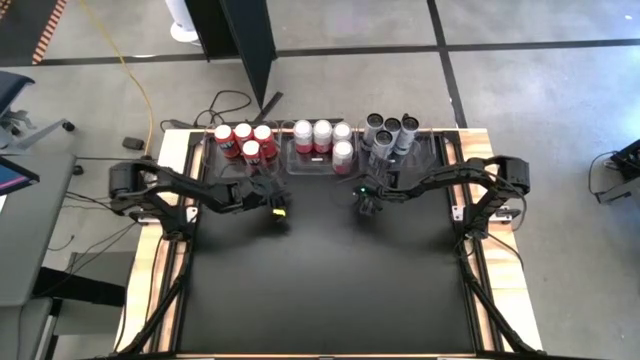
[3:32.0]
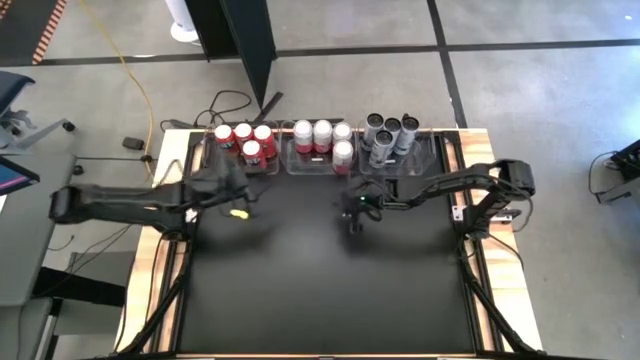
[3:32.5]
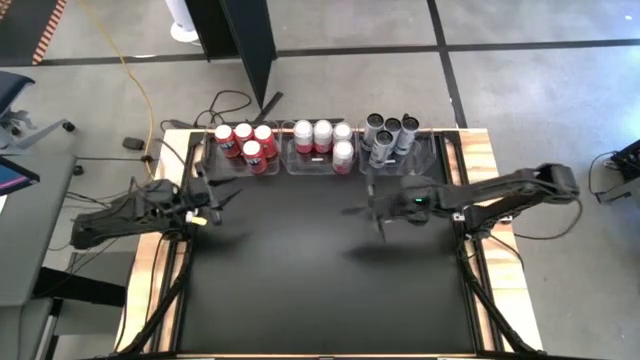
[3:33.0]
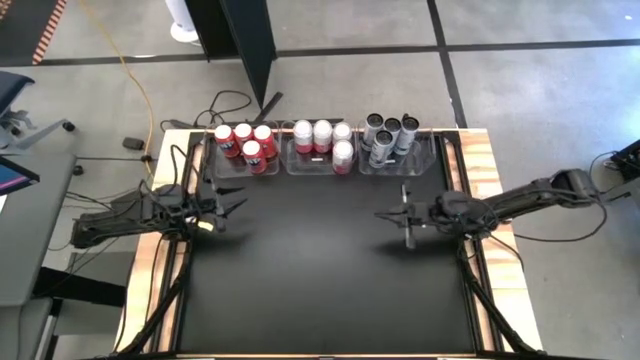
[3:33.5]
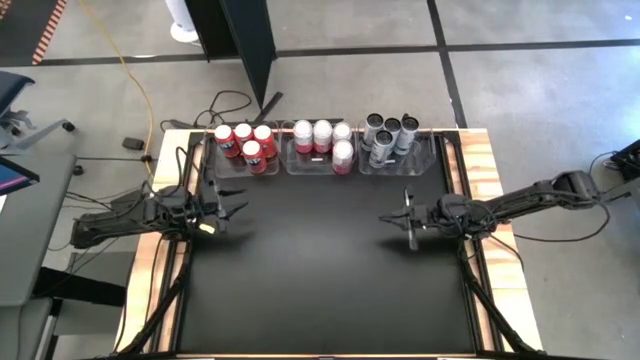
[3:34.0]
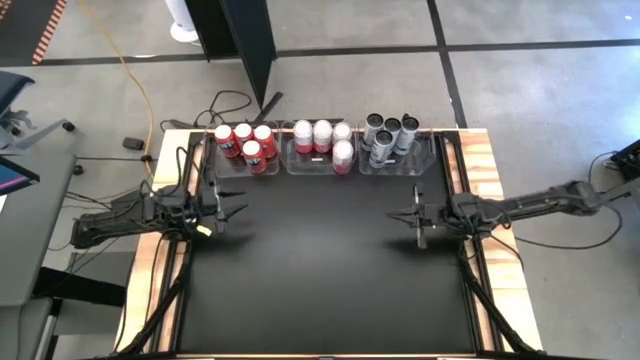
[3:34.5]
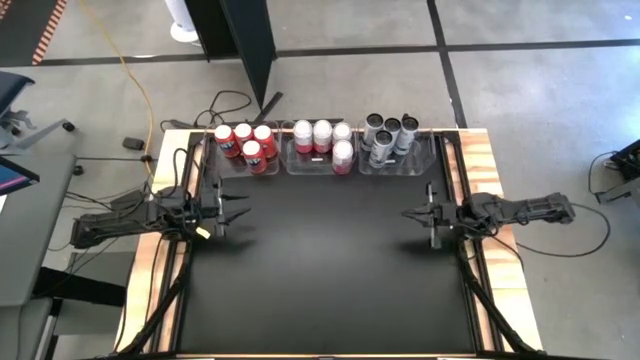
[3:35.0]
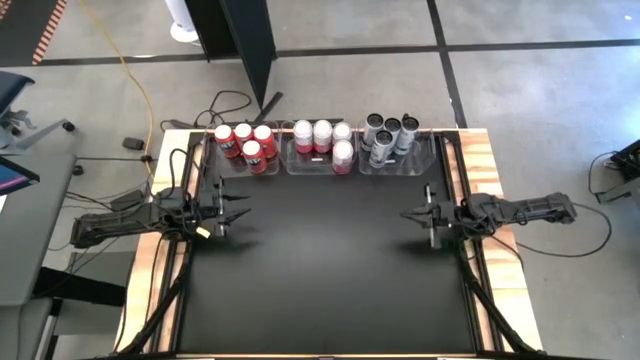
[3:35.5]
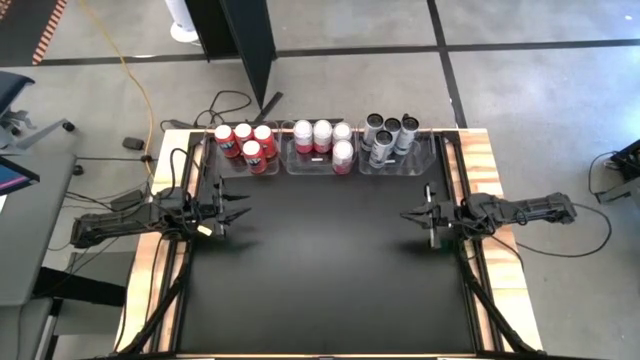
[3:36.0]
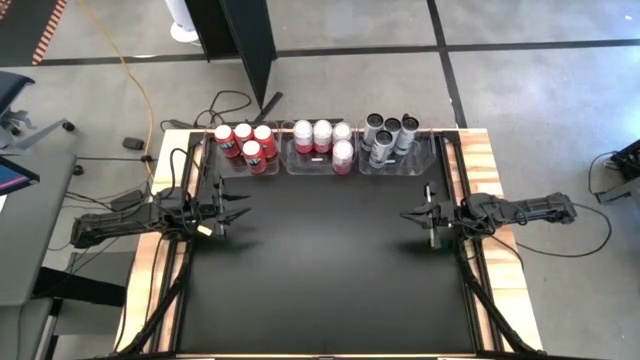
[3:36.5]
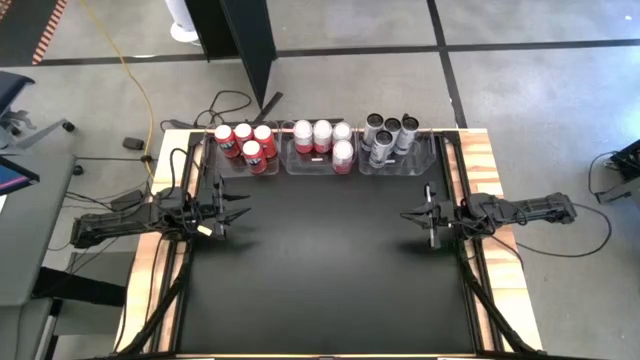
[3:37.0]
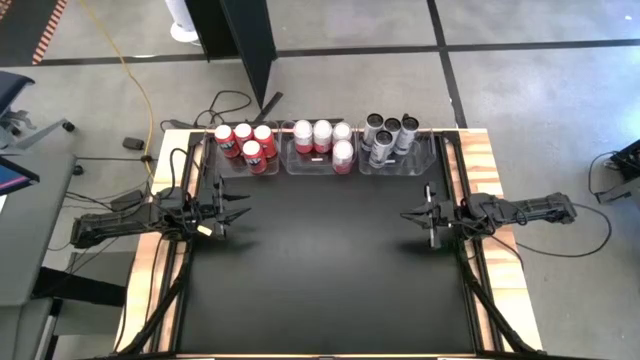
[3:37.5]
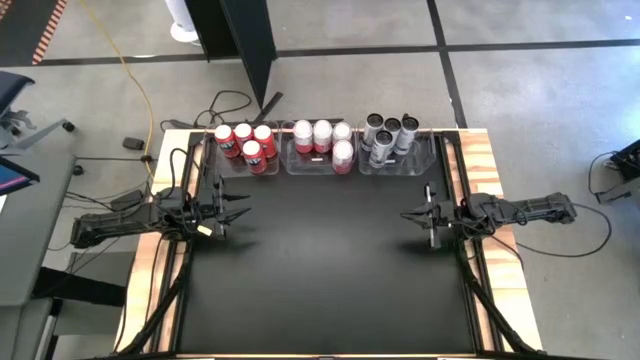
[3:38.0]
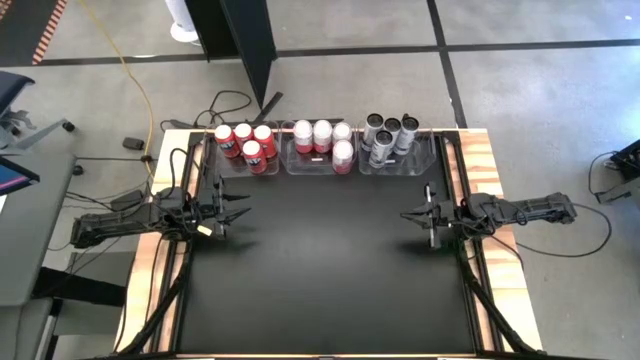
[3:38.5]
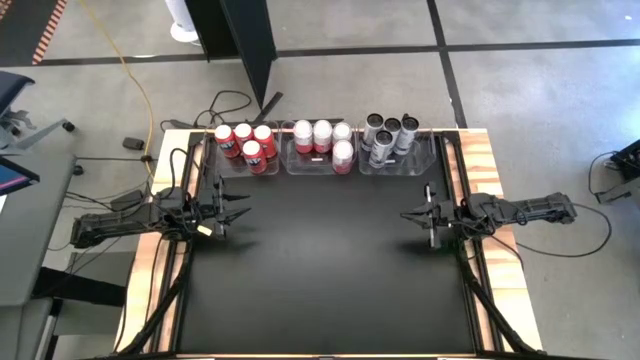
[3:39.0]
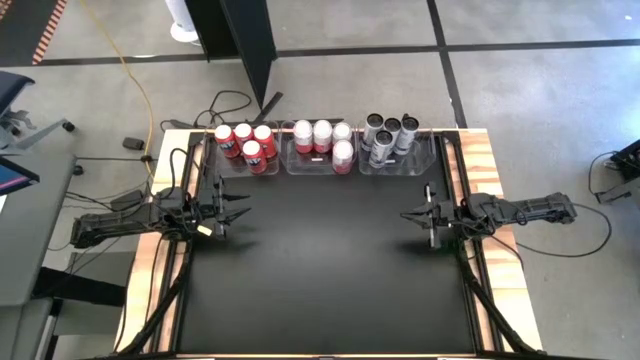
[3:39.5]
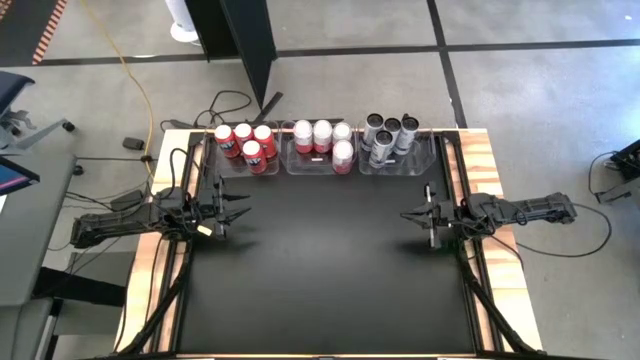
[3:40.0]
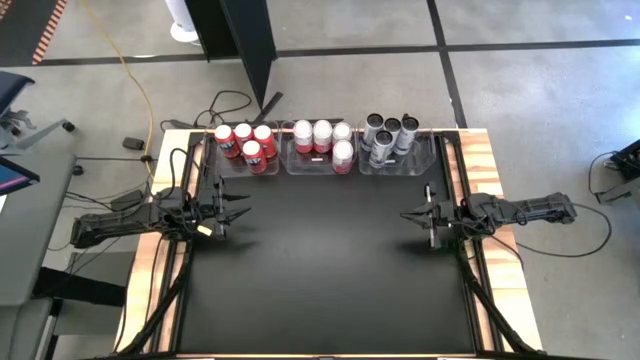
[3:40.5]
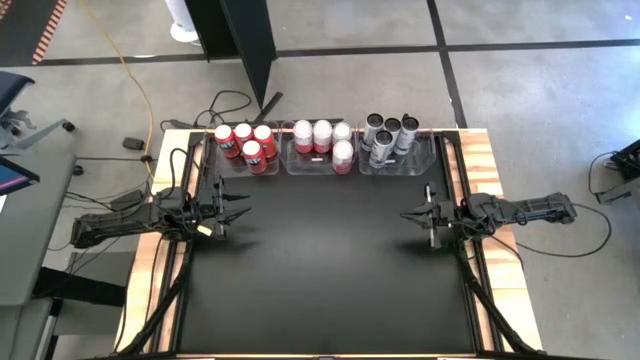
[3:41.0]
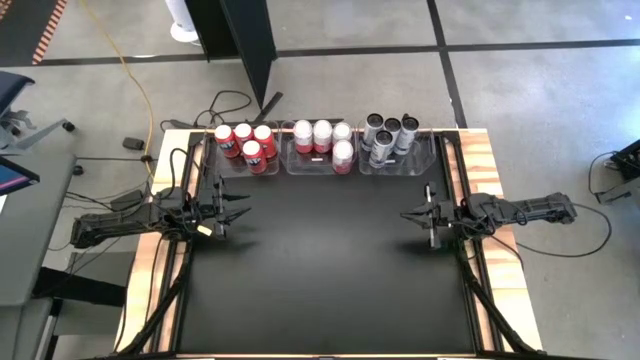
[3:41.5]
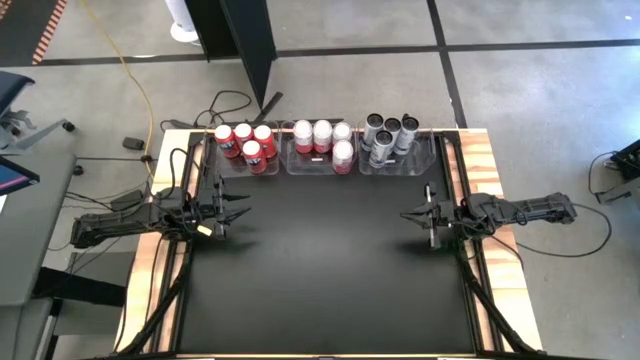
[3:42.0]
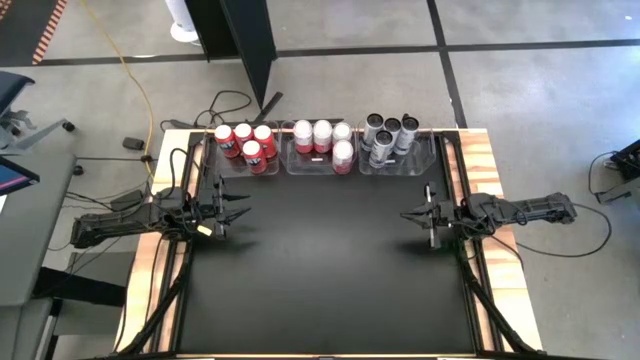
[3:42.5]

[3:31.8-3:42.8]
Task: Sort soda cans
Return to Home Position

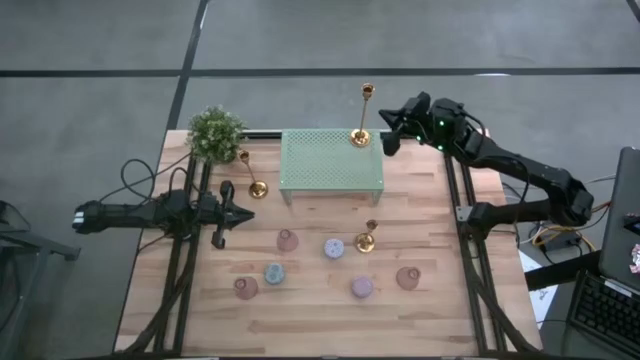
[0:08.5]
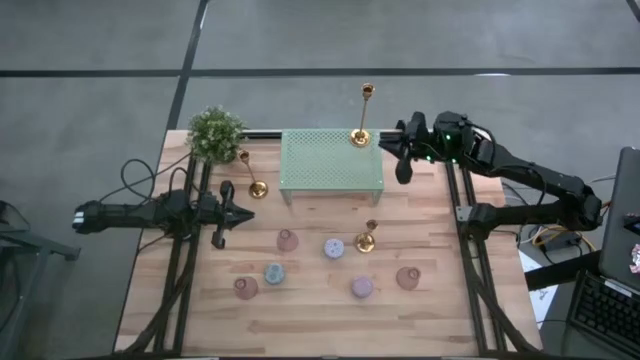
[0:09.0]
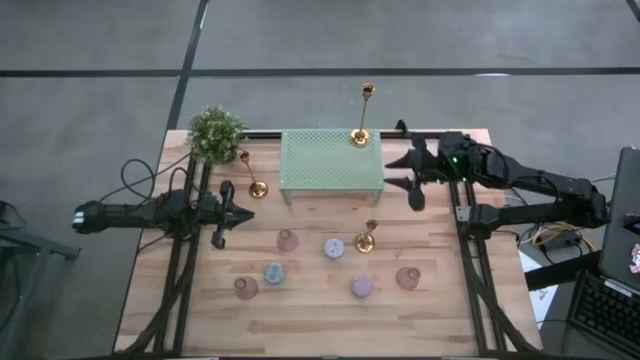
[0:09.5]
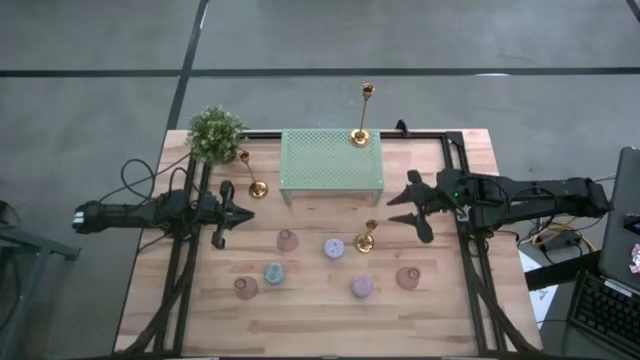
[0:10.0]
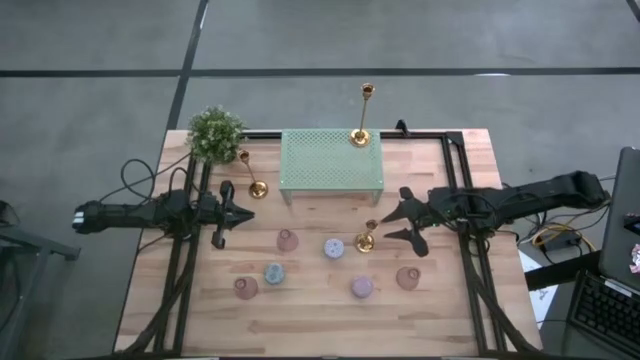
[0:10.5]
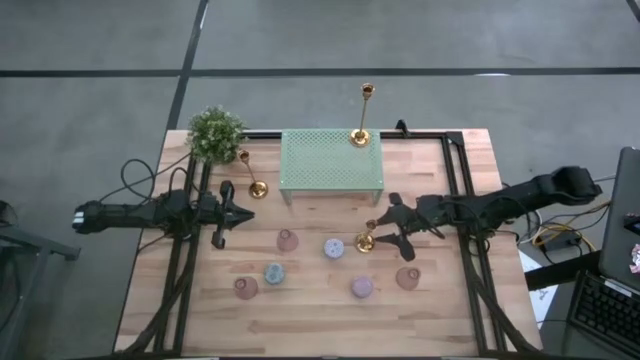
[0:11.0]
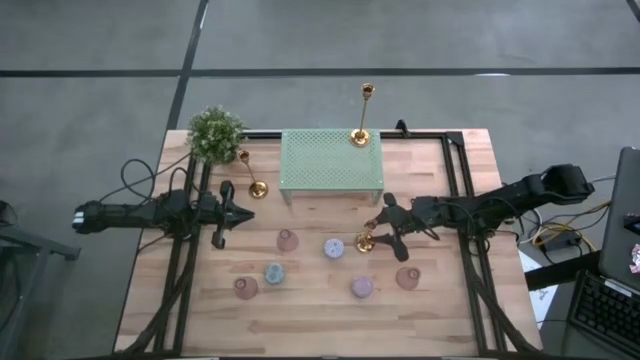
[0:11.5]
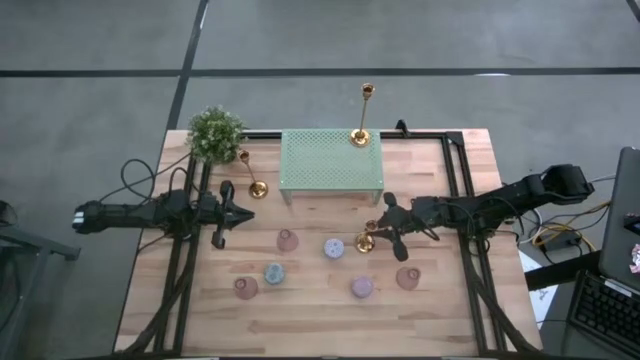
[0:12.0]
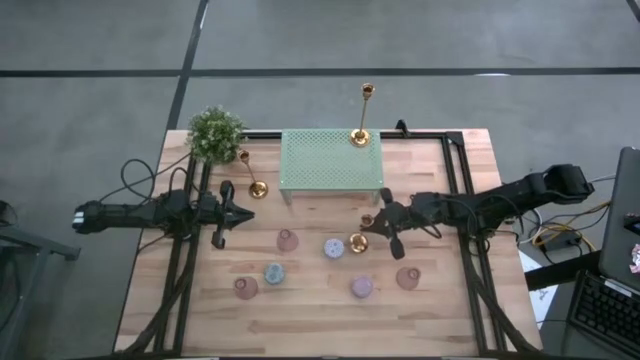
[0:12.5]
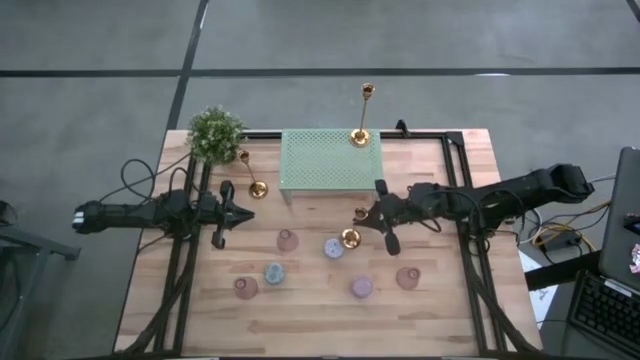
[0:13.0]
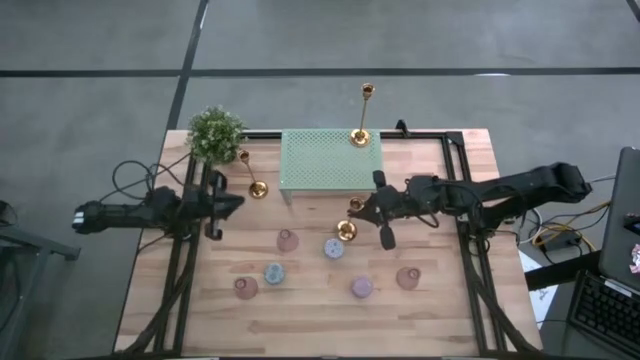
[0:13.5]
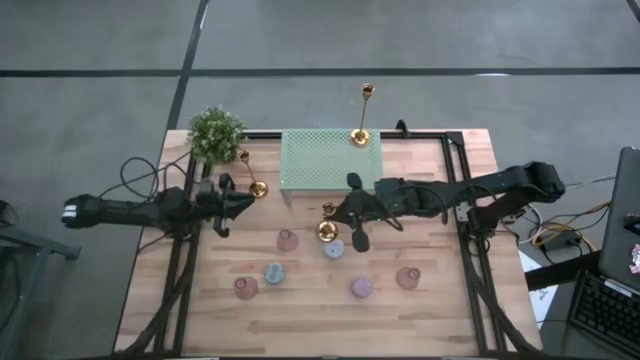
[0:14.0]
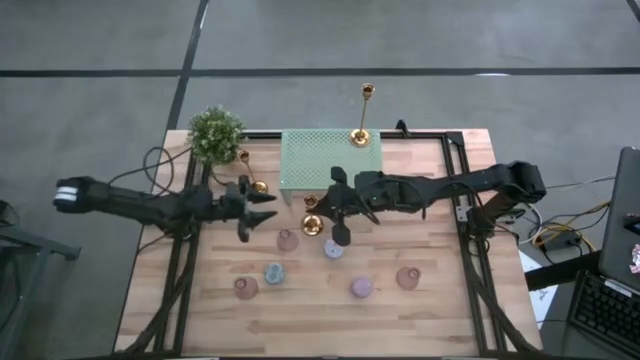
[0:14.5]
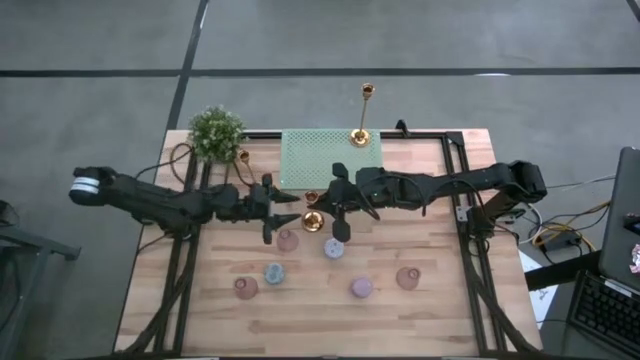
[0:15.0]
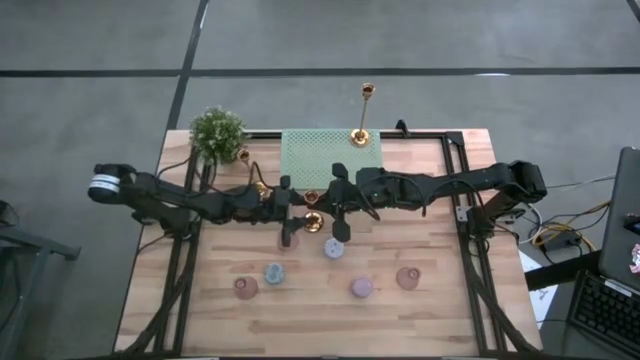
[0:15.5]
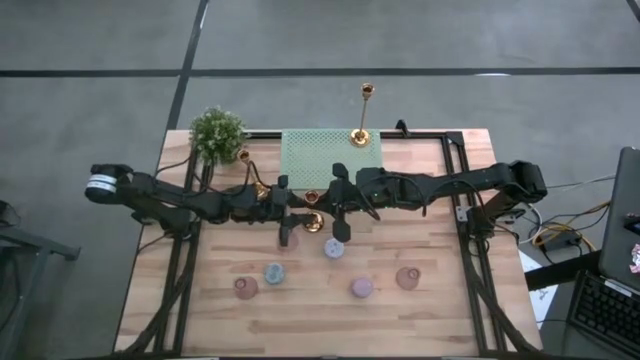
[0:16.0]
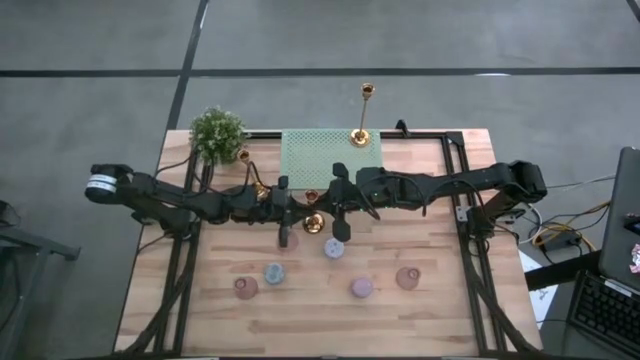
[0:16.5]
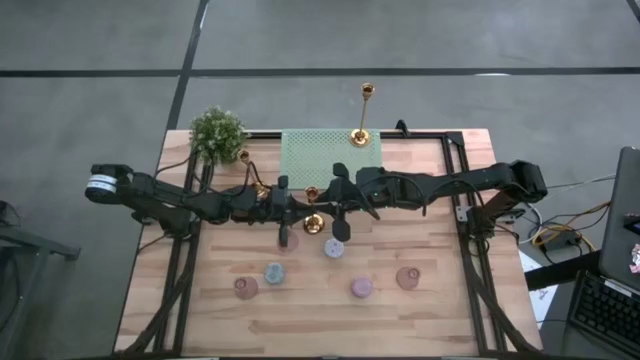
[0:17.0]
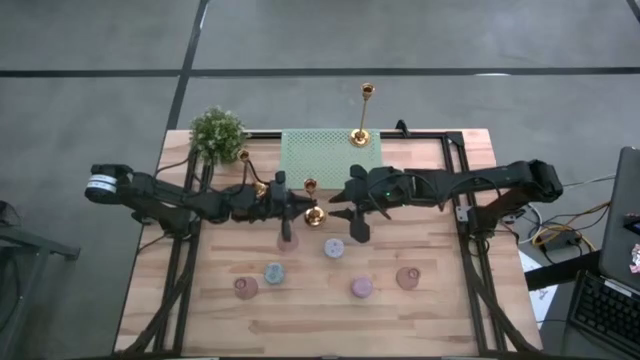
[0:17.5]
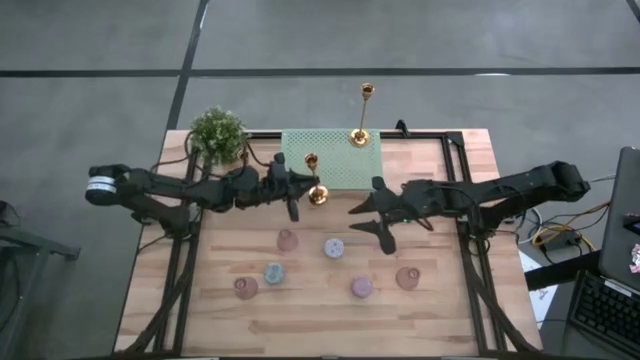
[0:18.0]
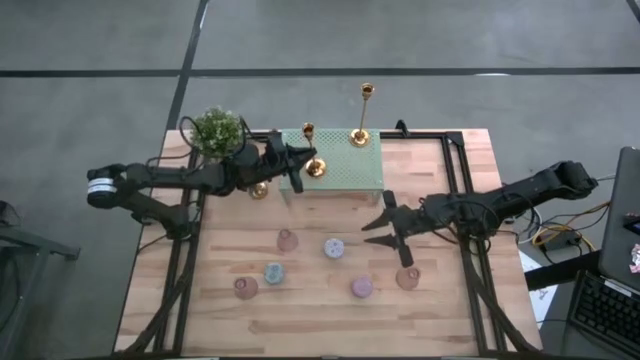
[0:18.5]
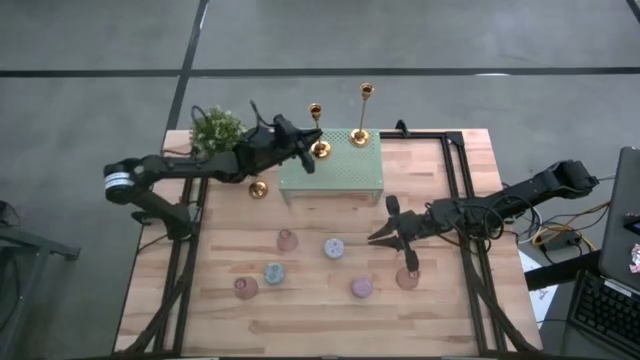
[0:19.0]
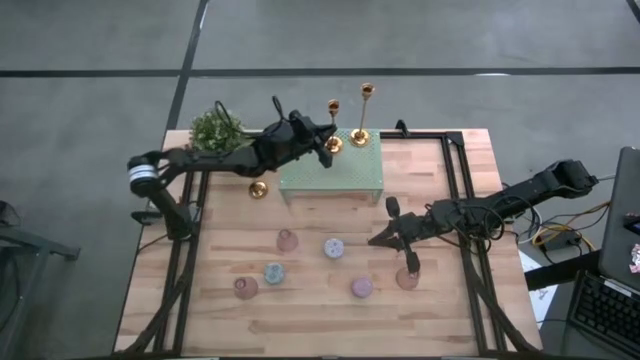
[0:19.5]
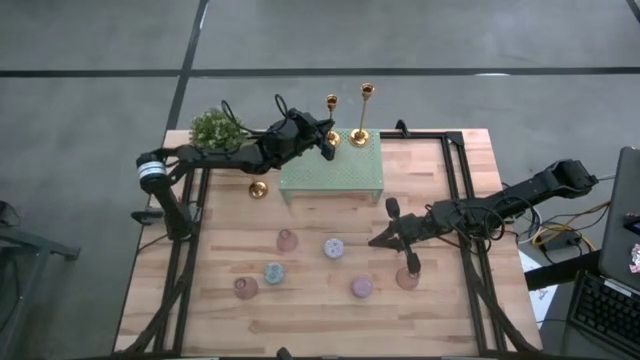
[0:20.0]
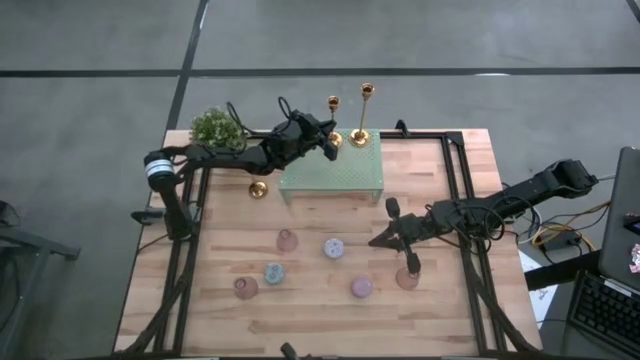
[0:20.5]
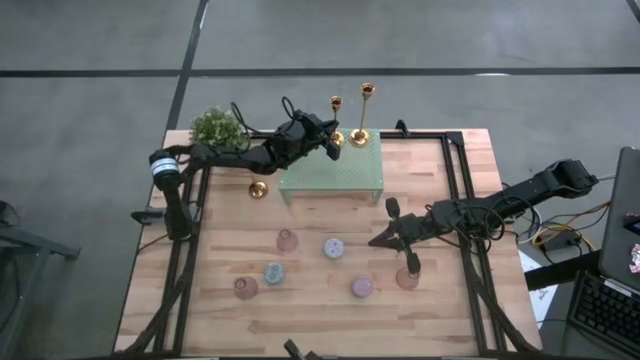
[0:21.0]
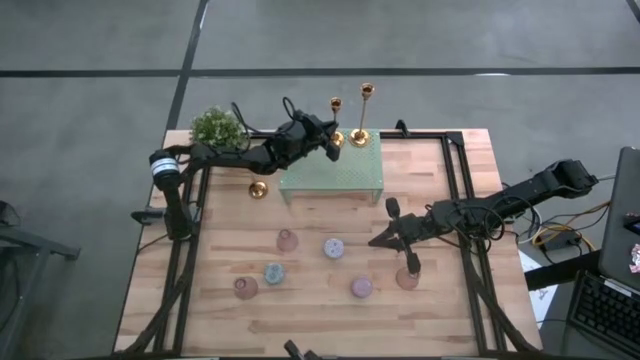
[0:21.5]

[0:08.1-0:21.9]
Task: Stock candles and vases on shelf
Align the bottom gold candle holder with the other gold candle holder on the shelf
